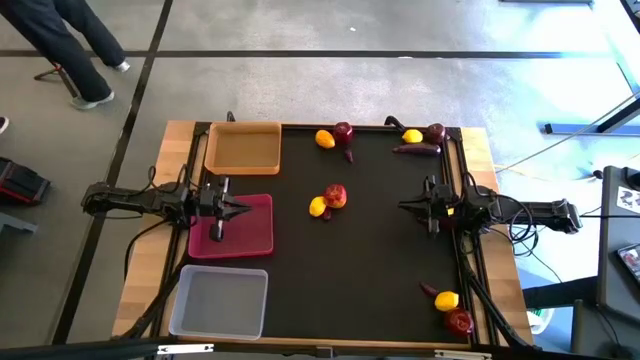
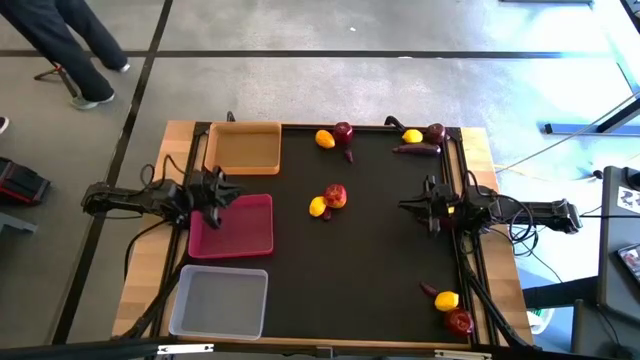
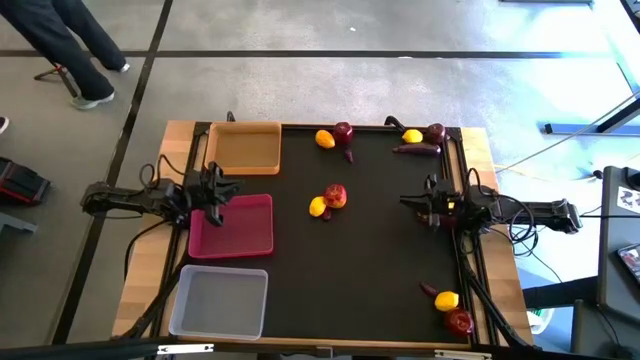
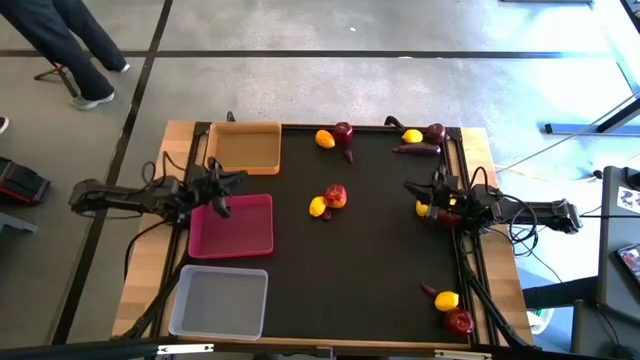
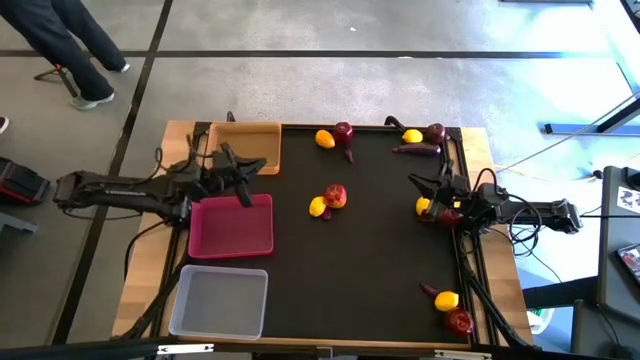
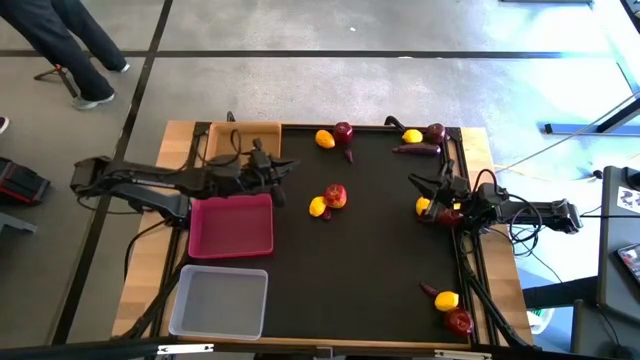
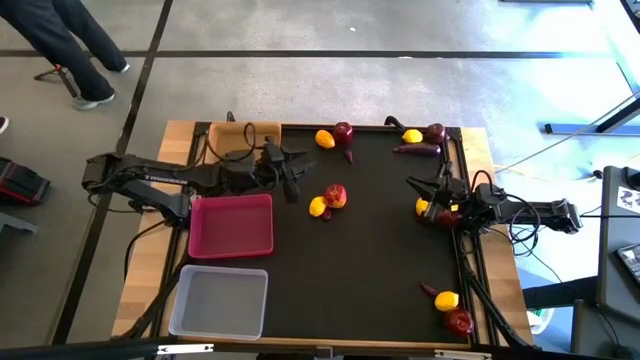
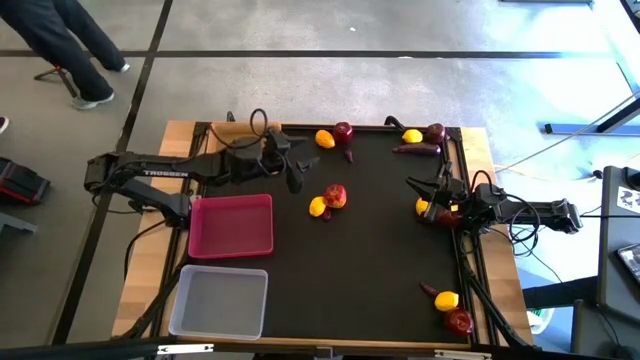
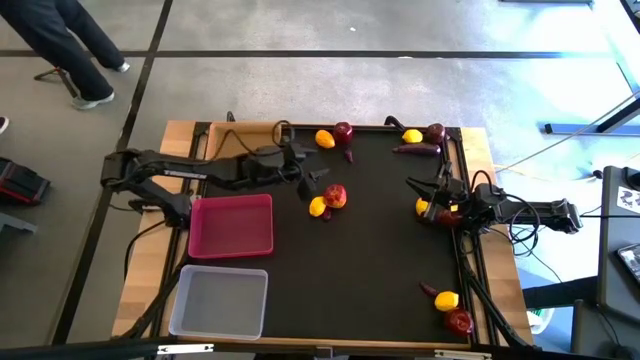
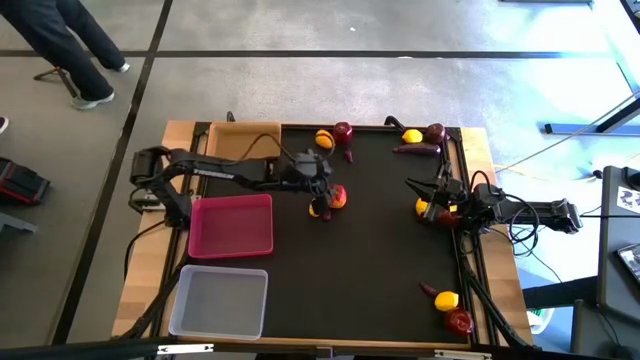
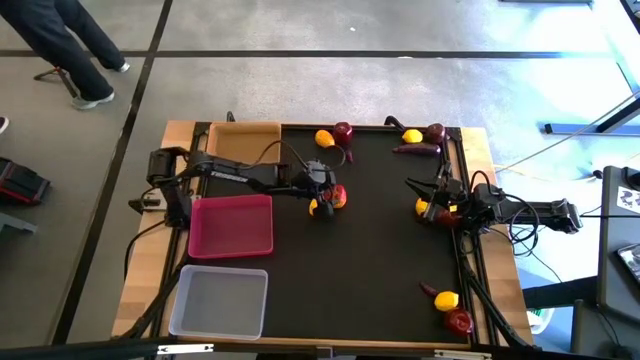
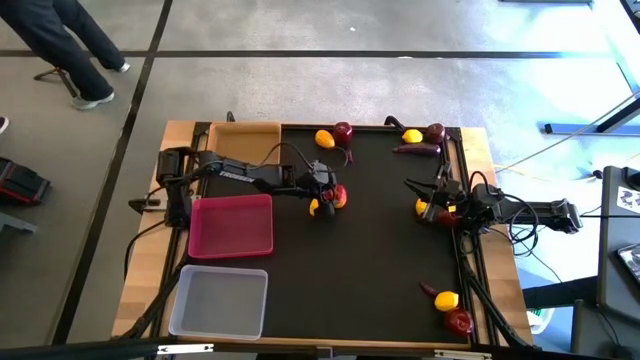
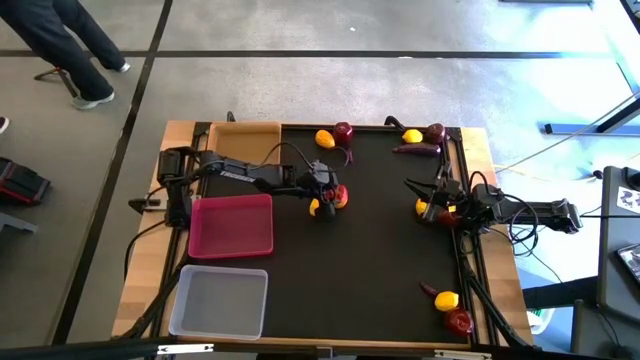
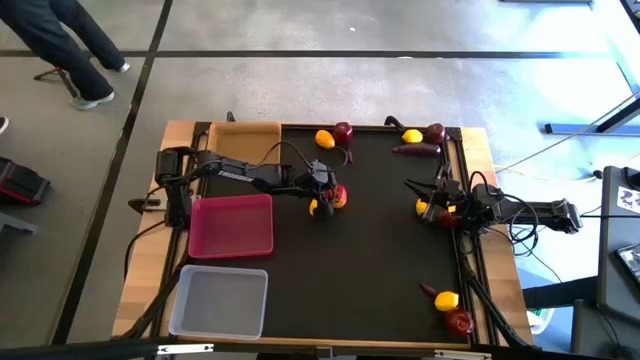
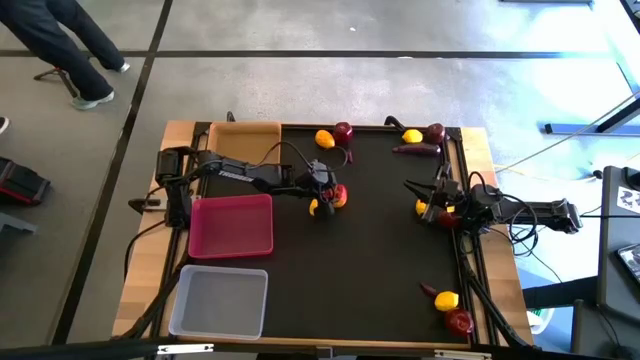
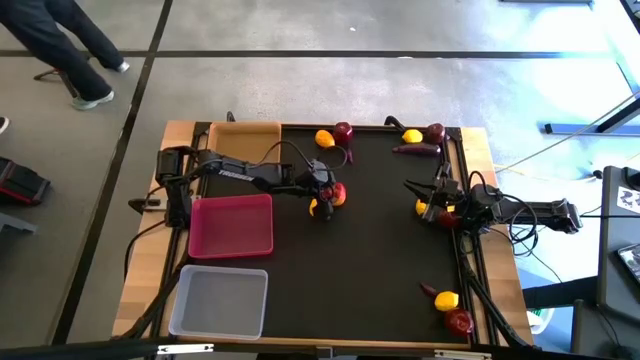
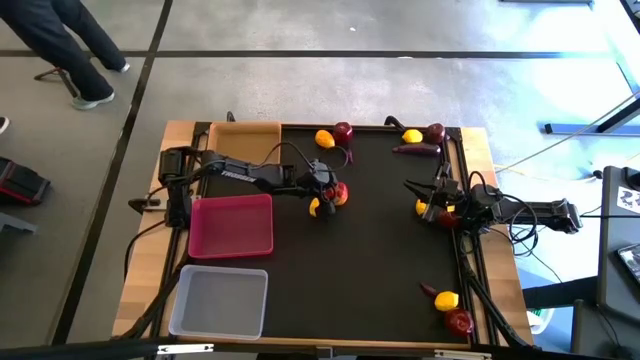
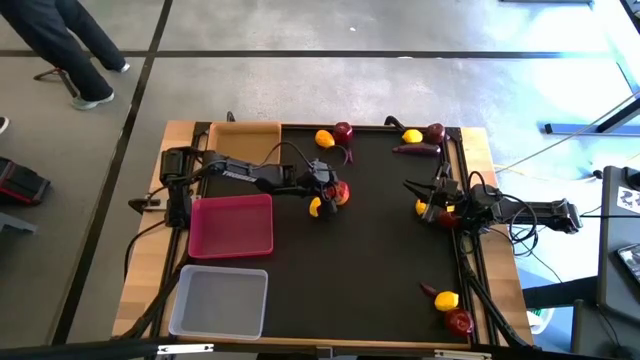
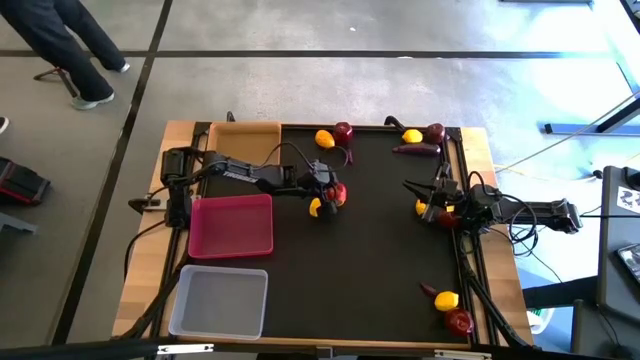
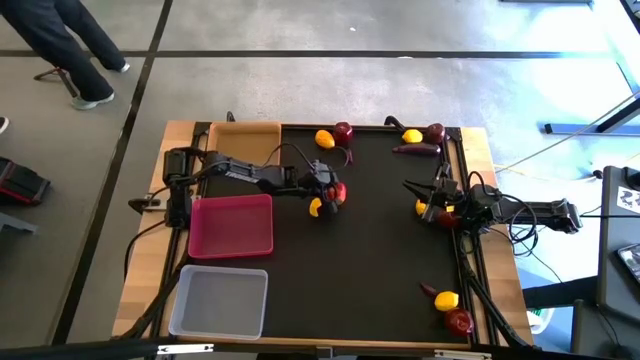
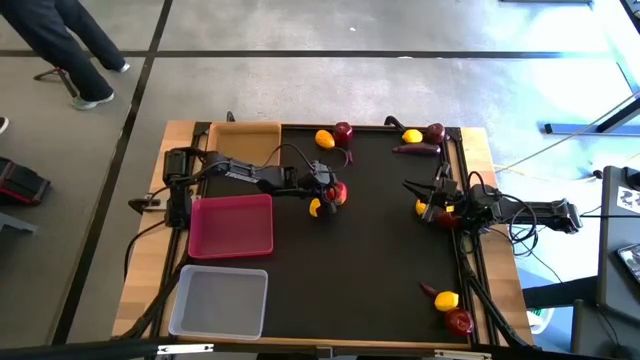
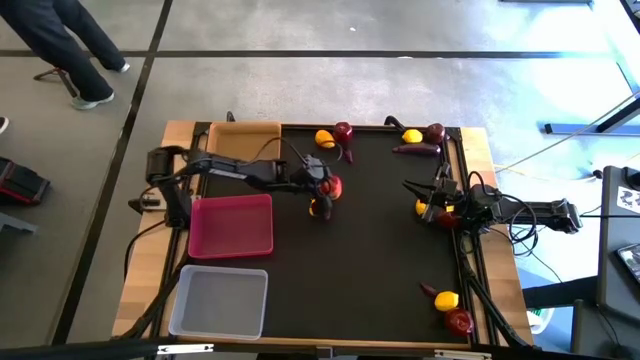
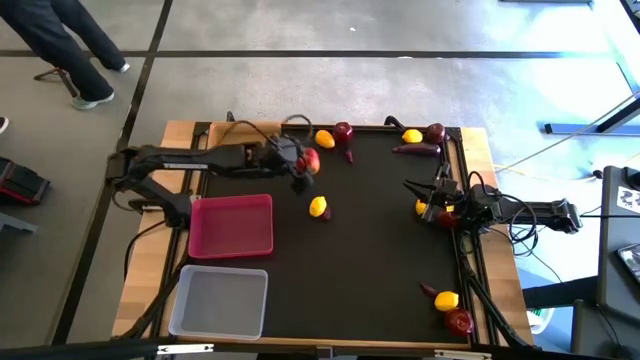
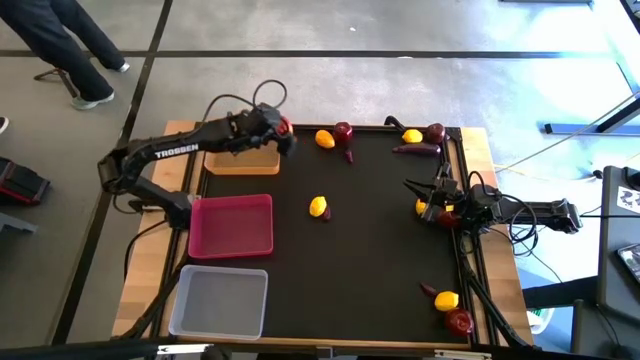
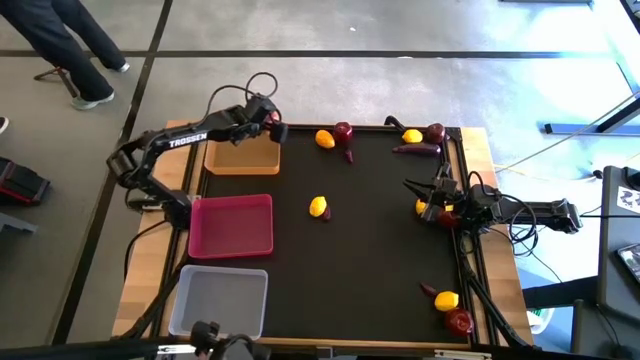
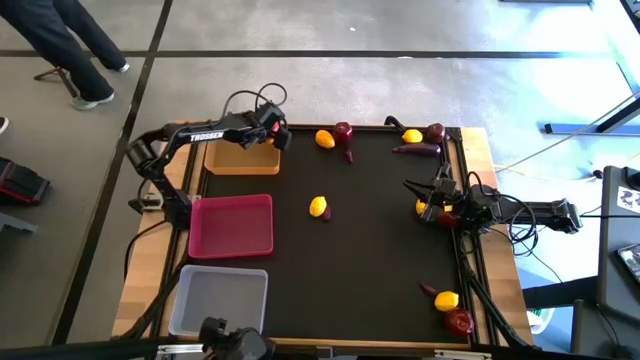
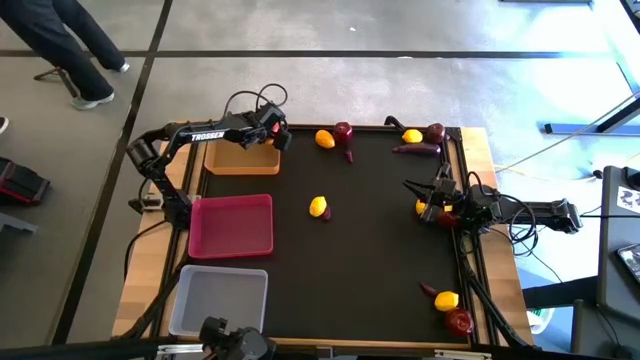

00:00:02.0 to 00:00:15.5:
Task: Sort produce into baskets
Put the middle left apple into the orange bin

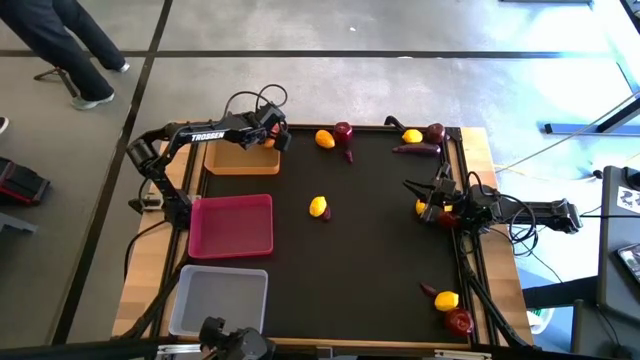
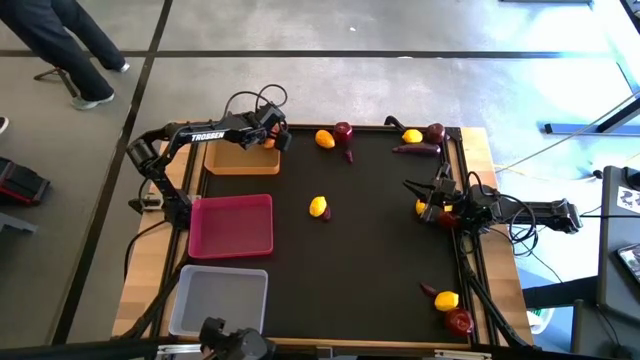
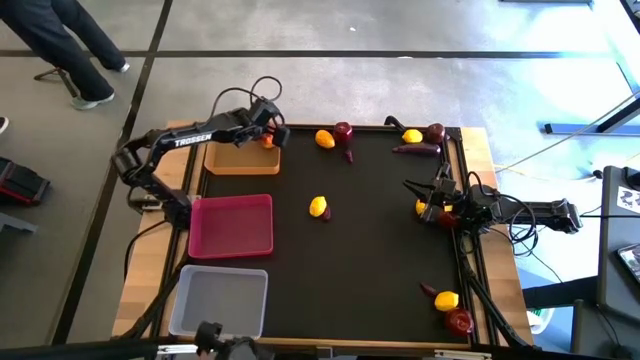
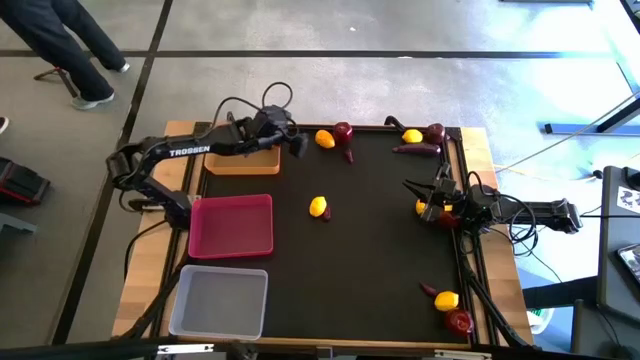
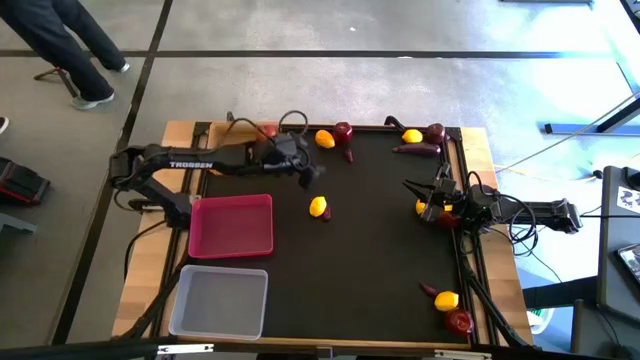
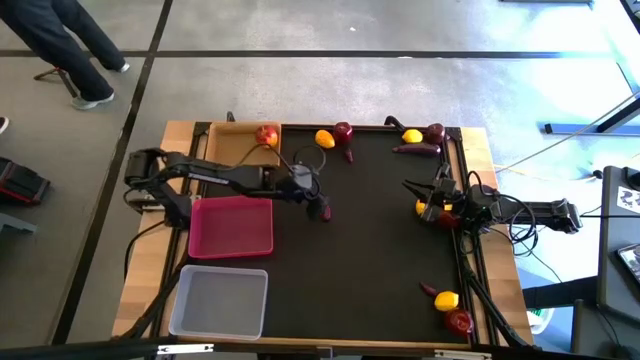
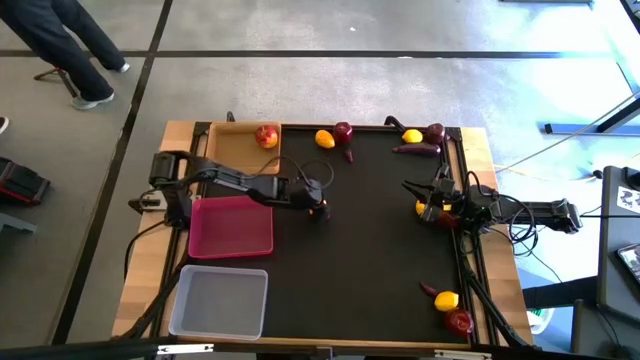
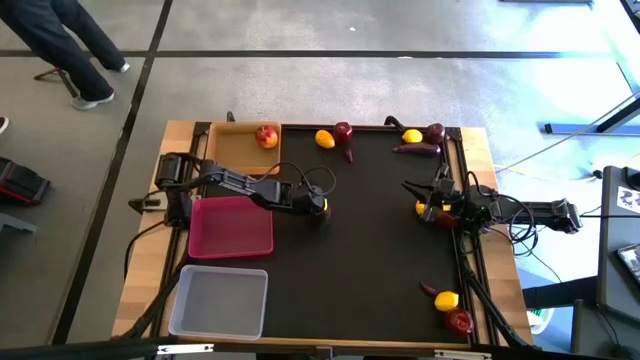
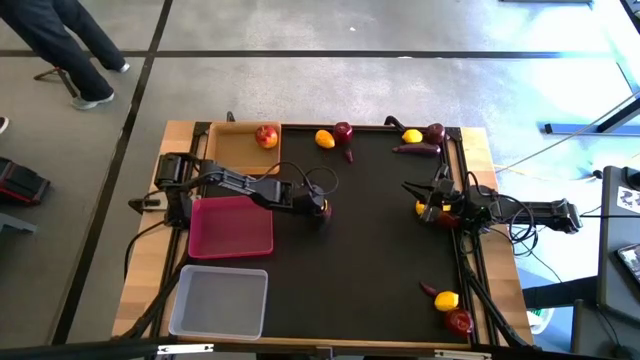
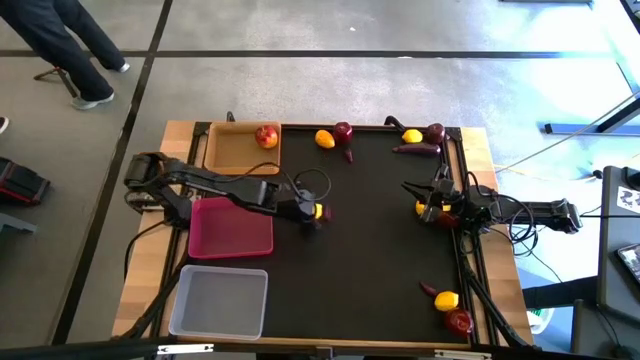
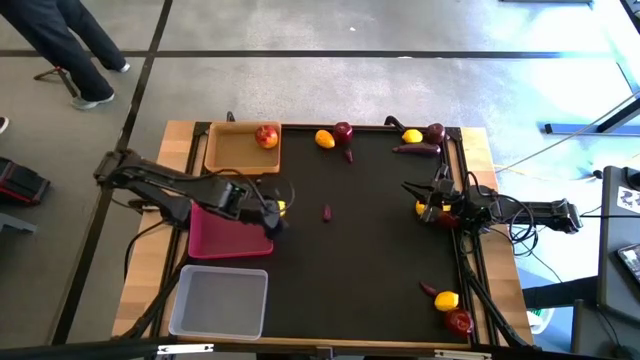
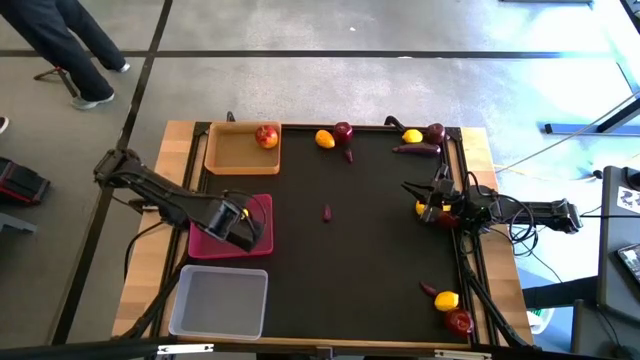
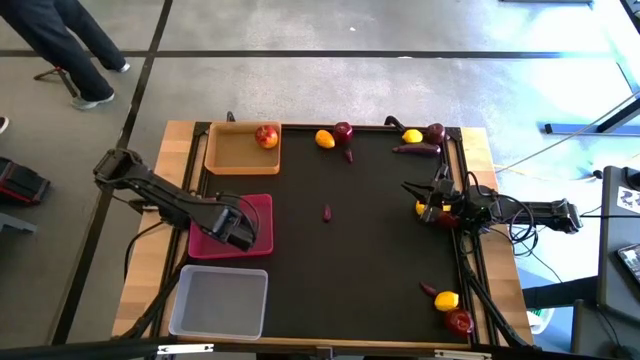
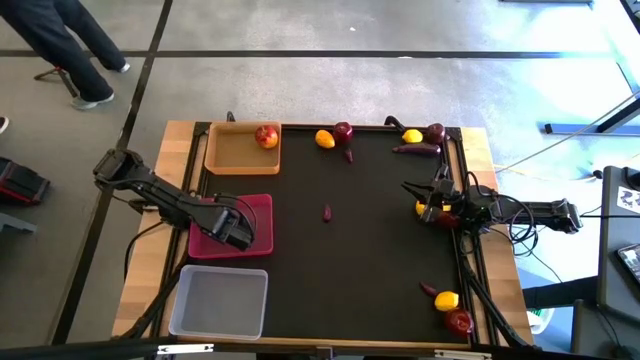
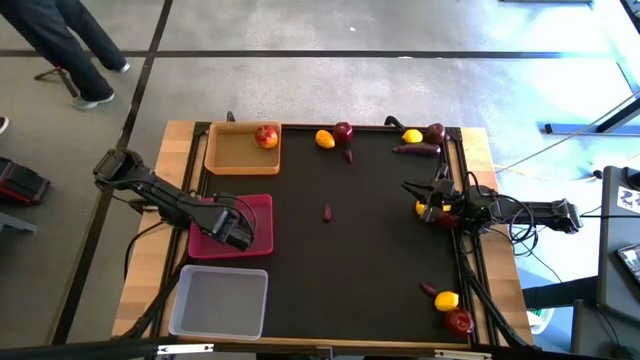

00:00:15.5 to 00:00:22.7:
Put the middle left lemon into the pink bin
